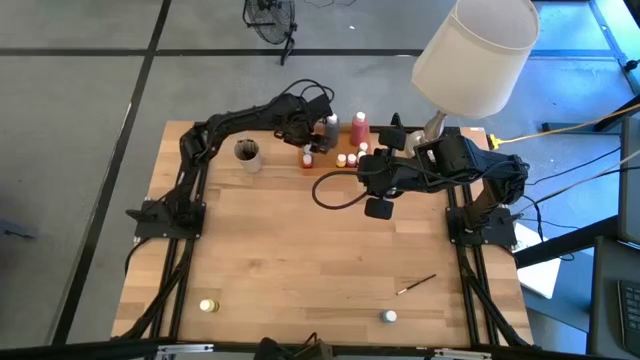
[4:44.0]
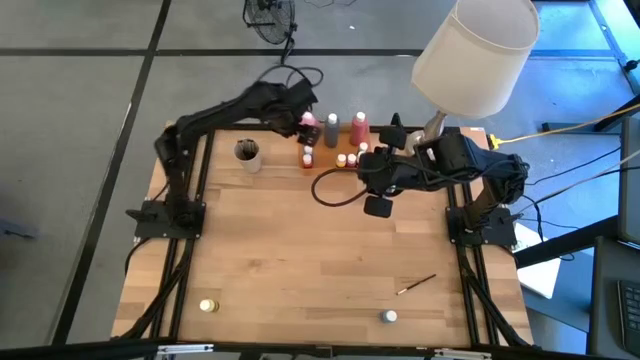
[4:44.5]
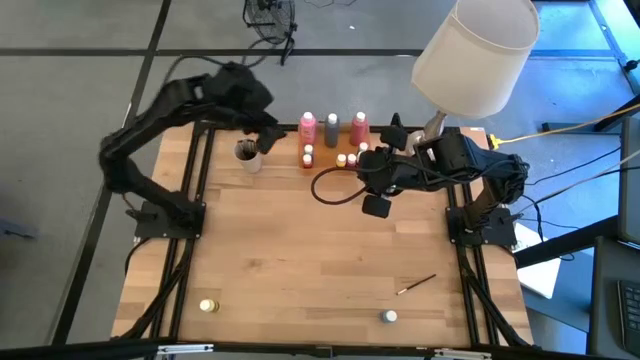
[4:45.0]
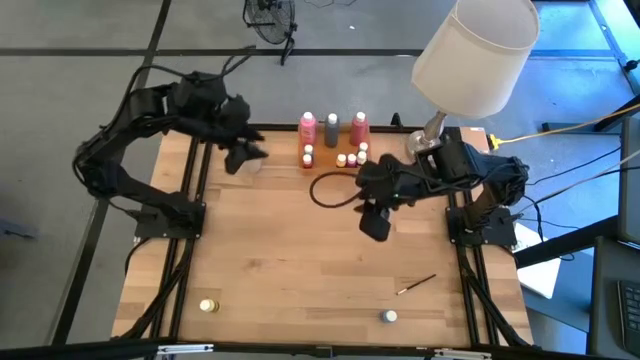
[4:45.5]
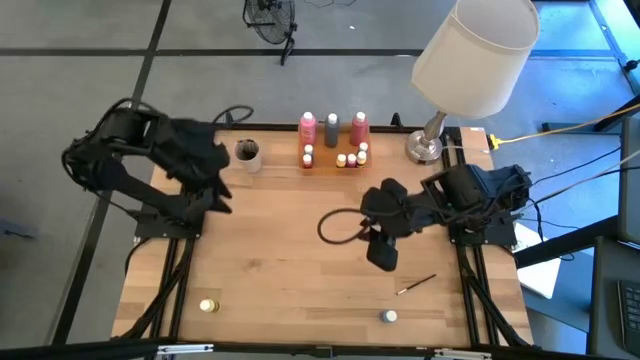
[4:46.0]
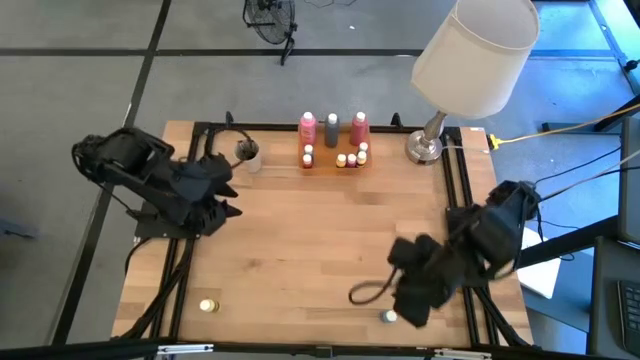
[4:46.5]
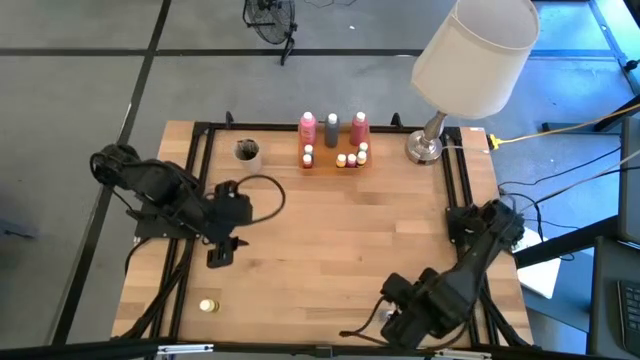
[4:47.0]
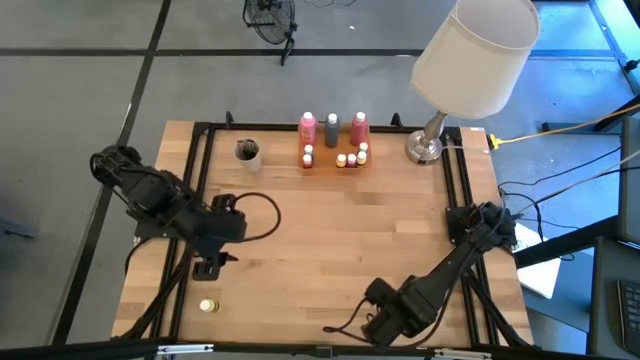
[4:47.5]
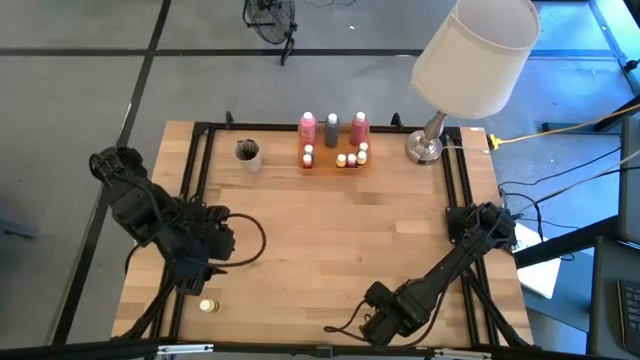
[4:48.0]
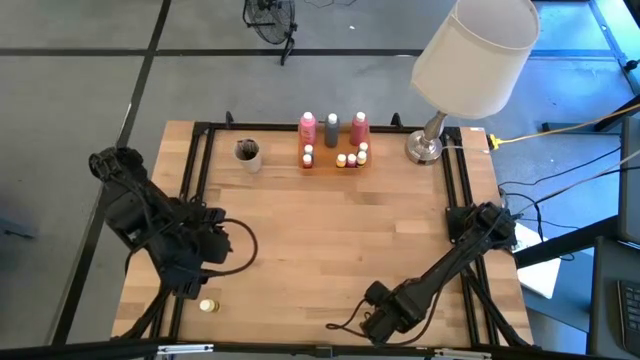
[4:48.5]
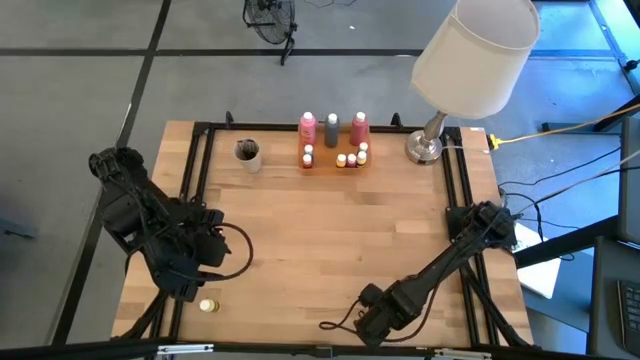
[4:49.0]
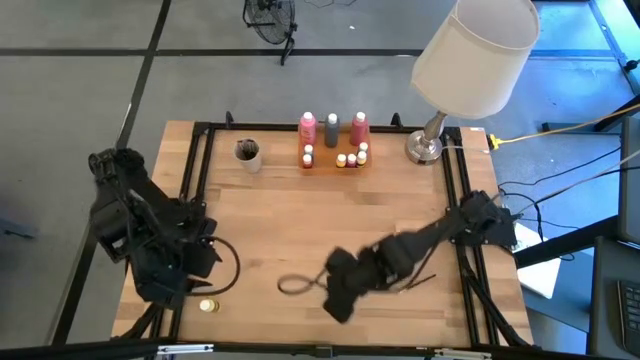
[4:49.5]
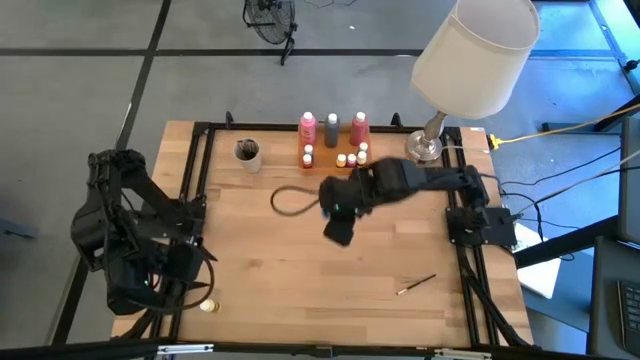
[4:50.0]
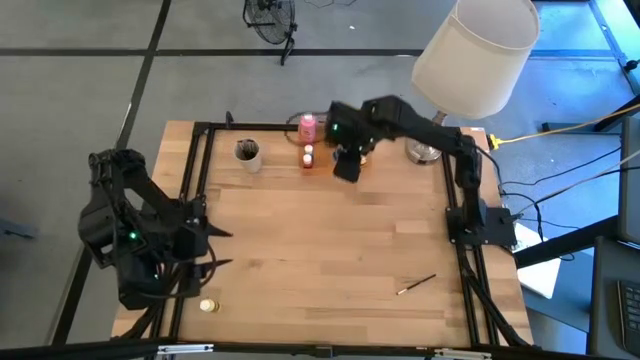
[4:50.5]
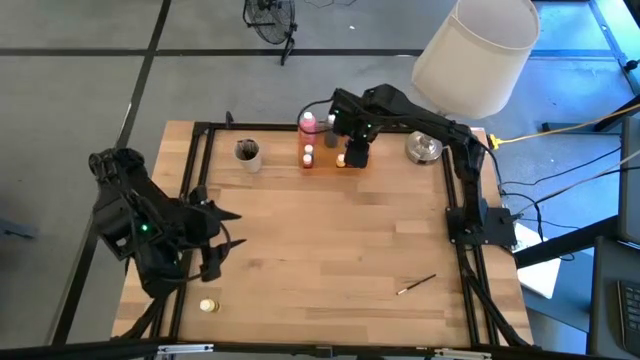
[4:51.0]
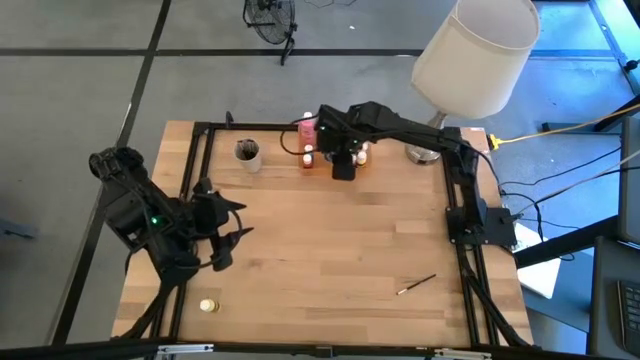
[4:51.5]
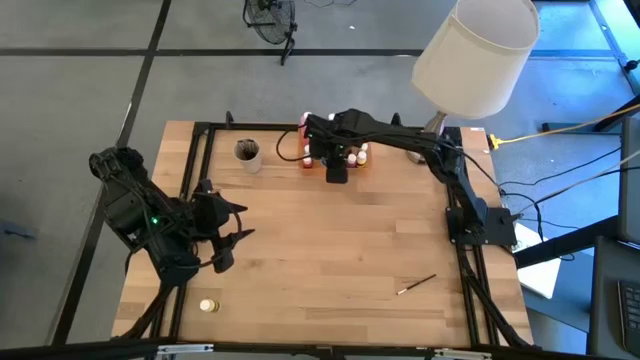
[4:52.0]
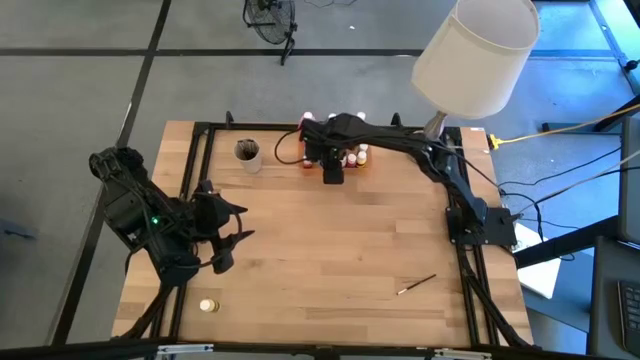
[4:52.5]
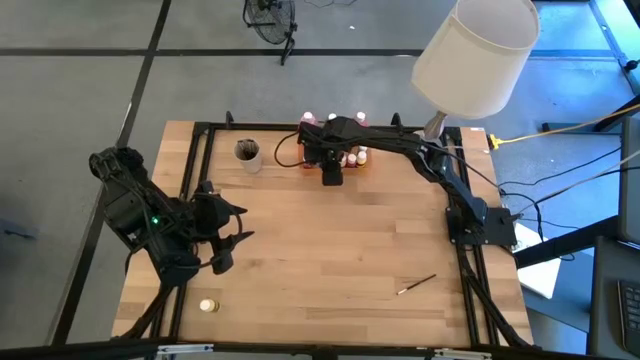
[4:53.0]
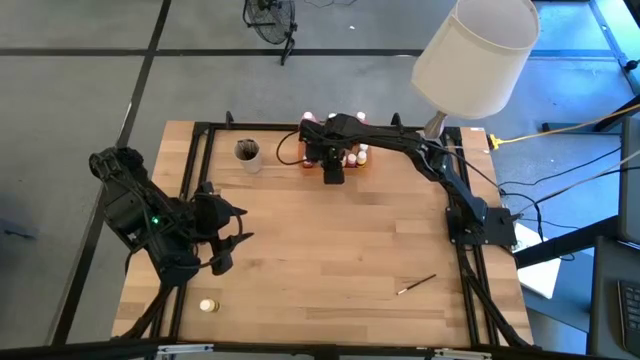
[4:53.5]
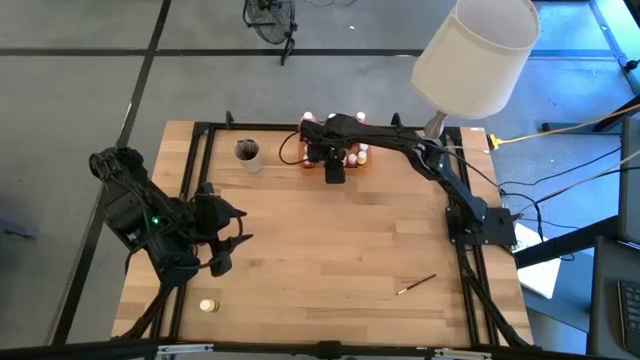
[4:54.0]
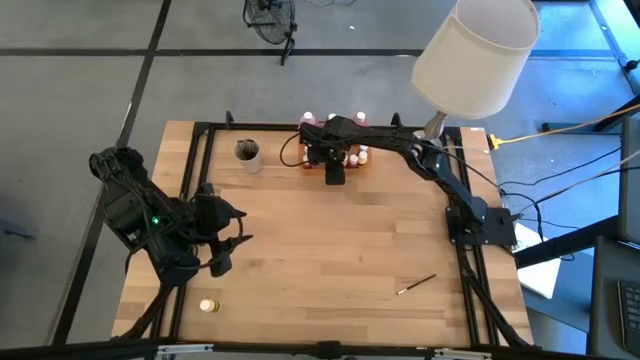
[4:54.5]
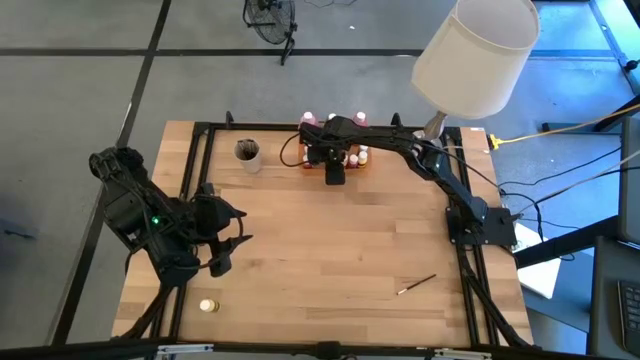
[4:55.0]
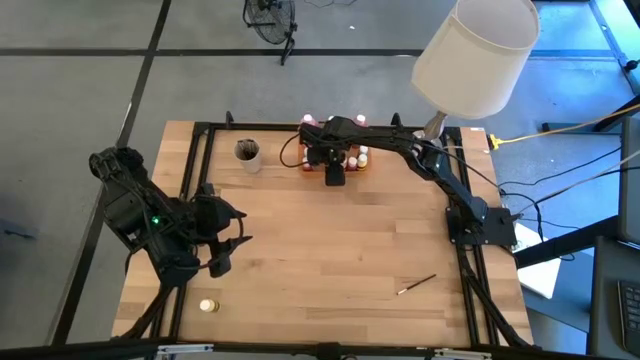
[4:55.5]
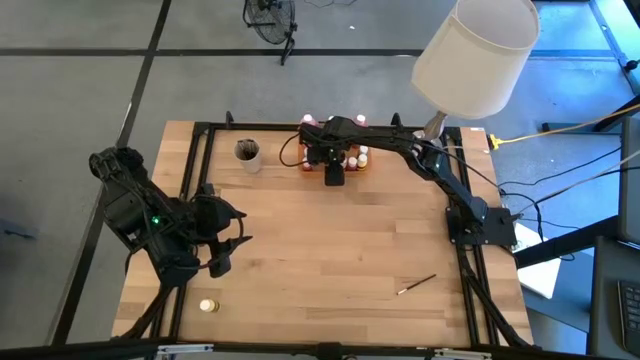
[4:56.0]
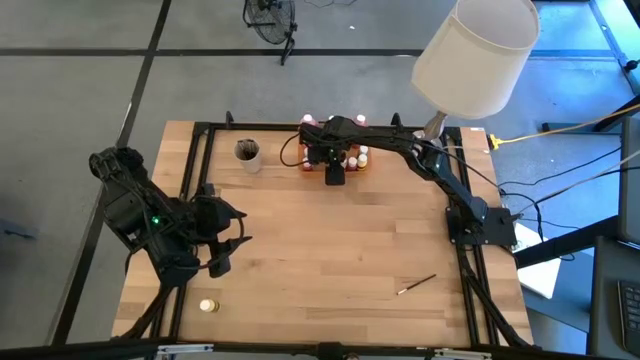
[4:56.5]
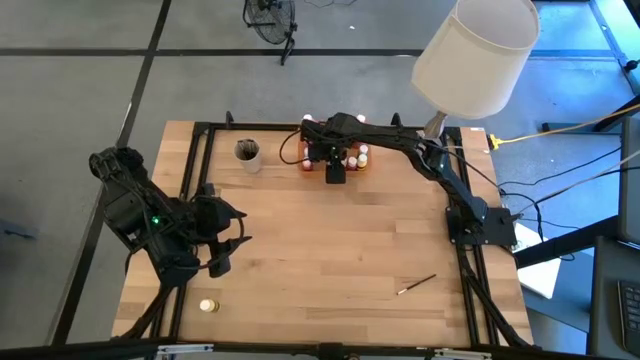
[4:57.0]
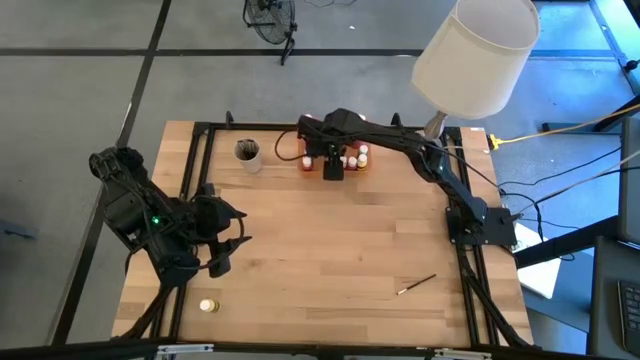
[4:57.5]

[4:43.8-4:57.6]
Task: Pick & Place Paint Supplies
Put the blue paint bottle into the orange bin

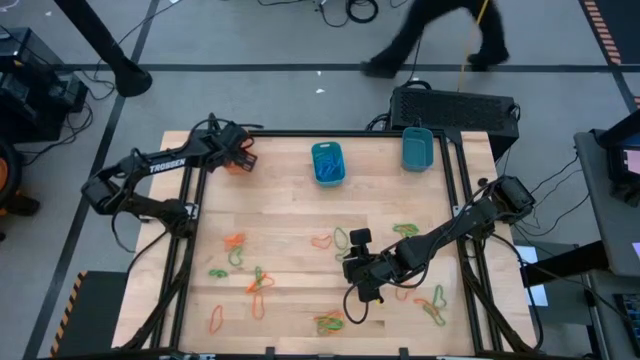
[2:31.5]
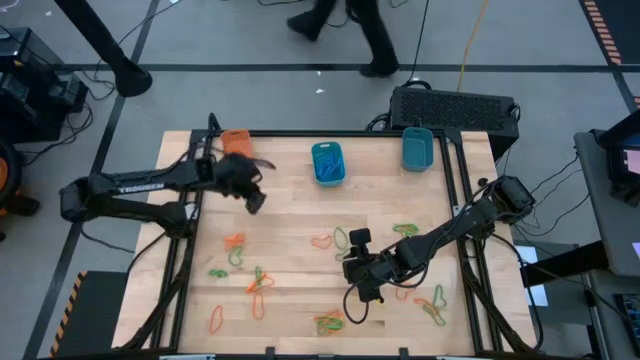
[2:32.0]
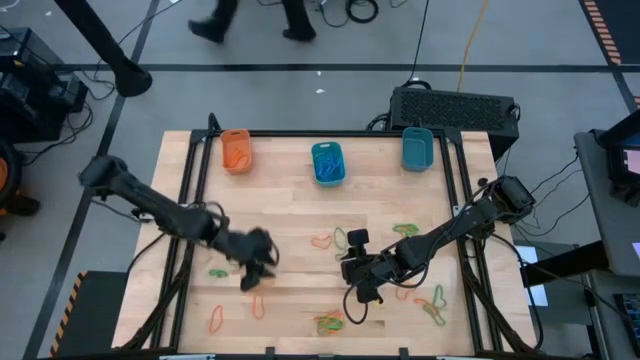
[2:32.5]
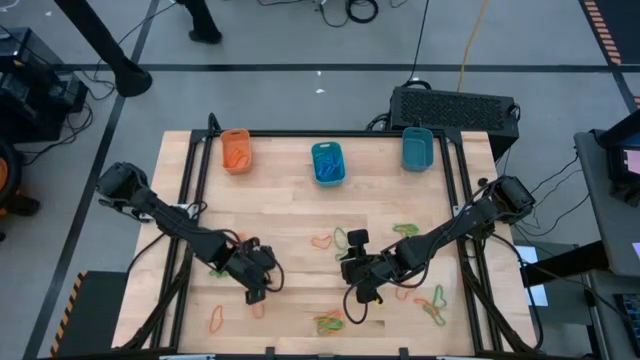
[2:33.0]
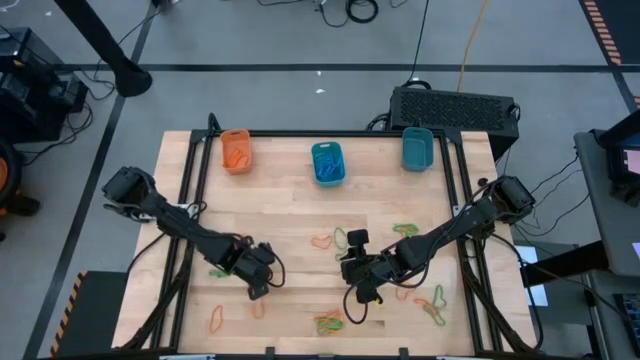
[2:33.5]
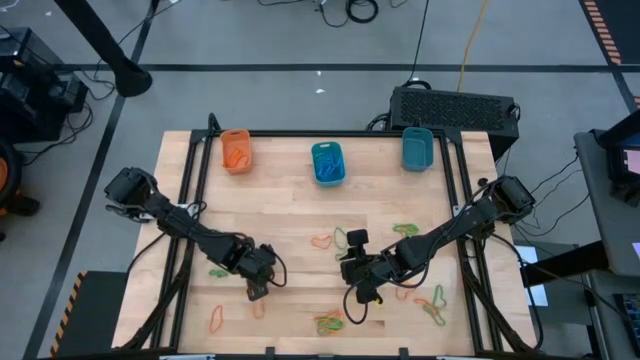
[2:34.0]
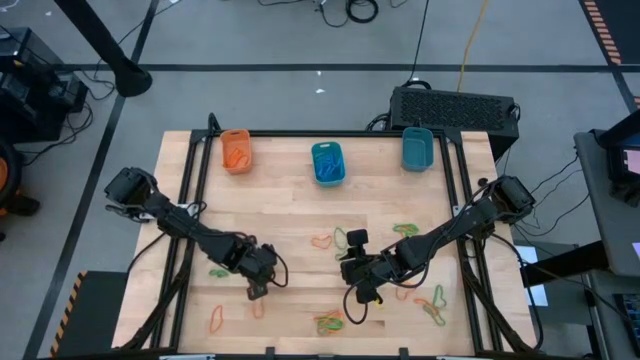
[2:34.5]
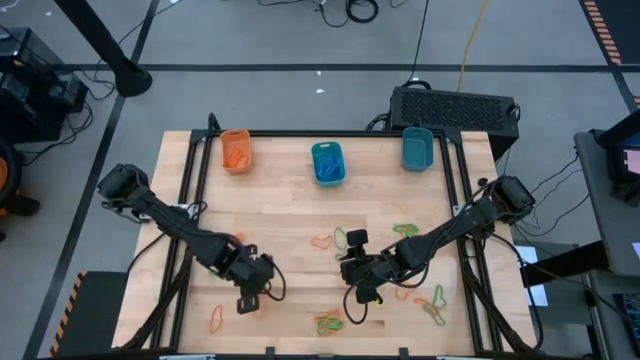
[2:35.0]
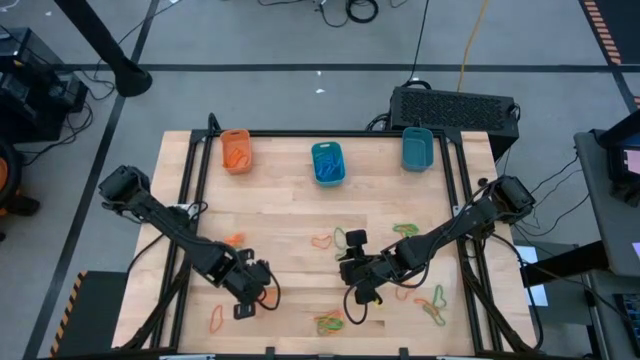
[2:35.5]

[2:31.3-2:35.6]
Task: Sort rubber bands into baskets
Put the orange rubber band into the orange bin
